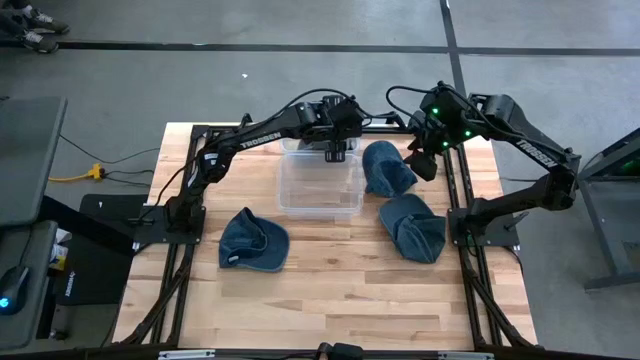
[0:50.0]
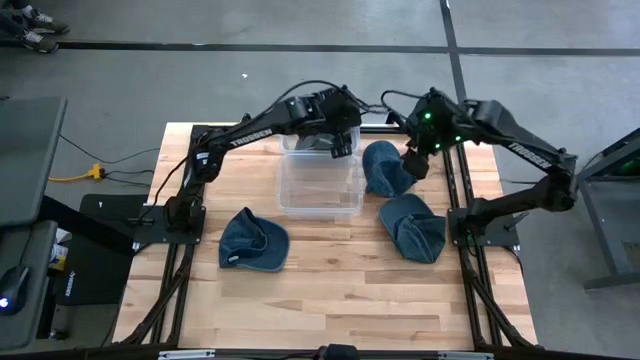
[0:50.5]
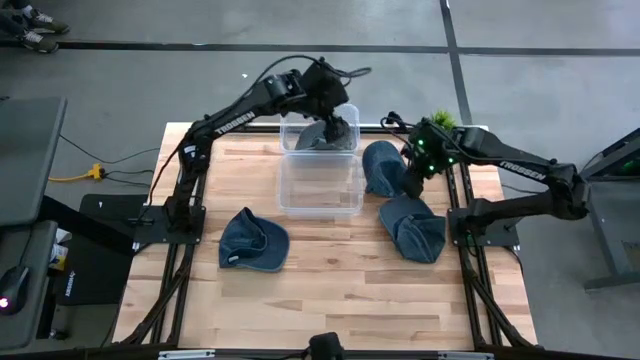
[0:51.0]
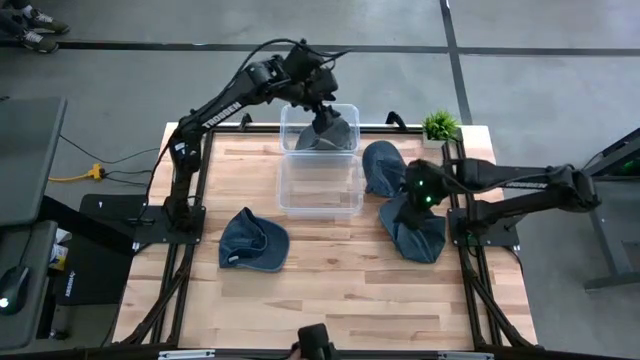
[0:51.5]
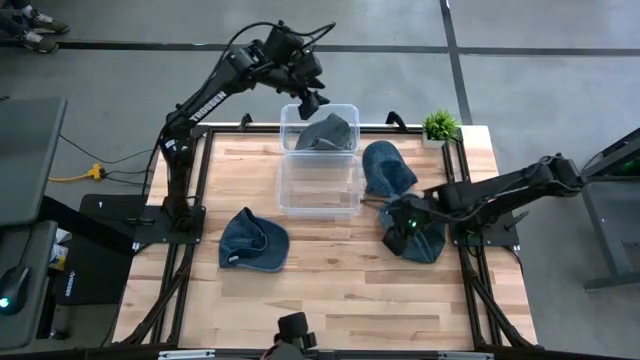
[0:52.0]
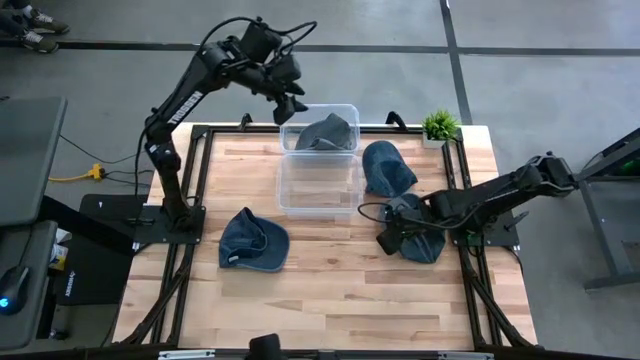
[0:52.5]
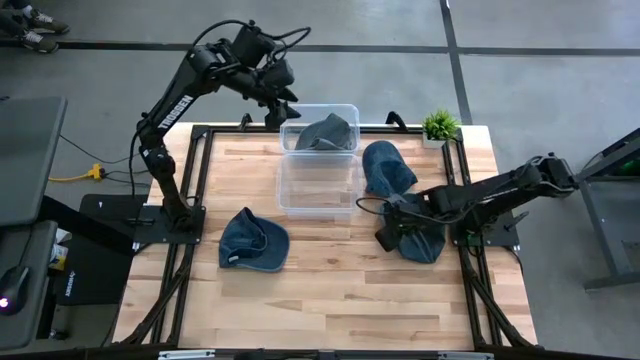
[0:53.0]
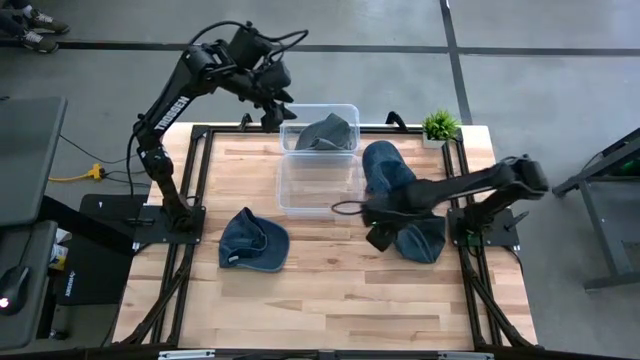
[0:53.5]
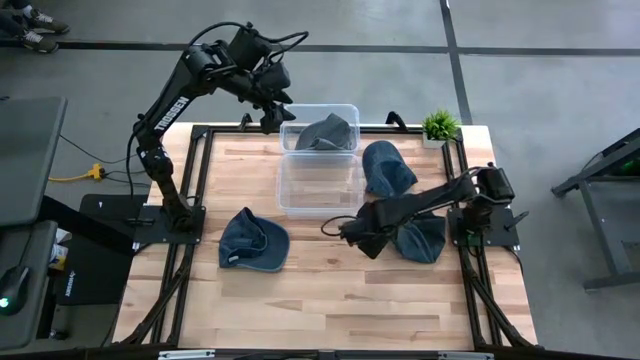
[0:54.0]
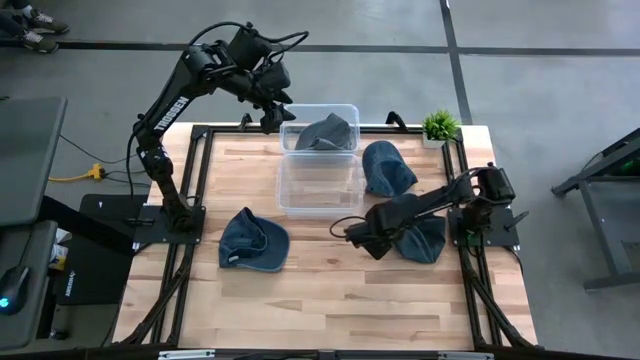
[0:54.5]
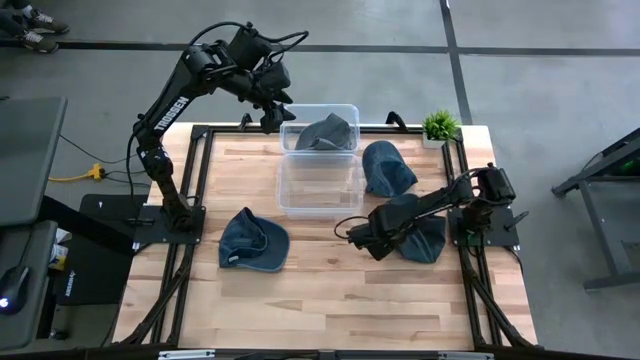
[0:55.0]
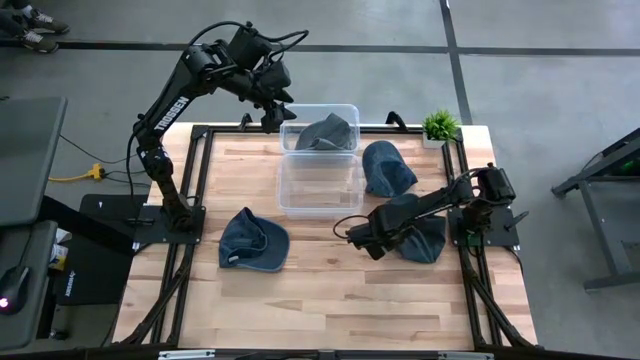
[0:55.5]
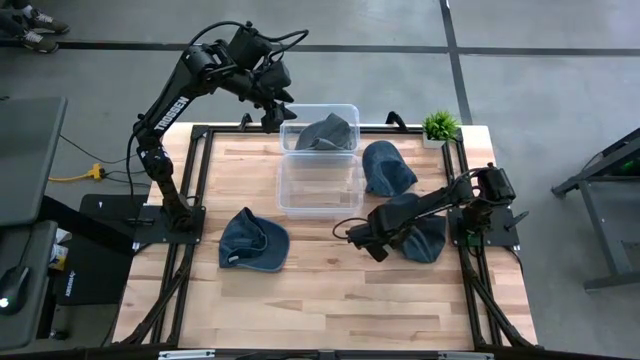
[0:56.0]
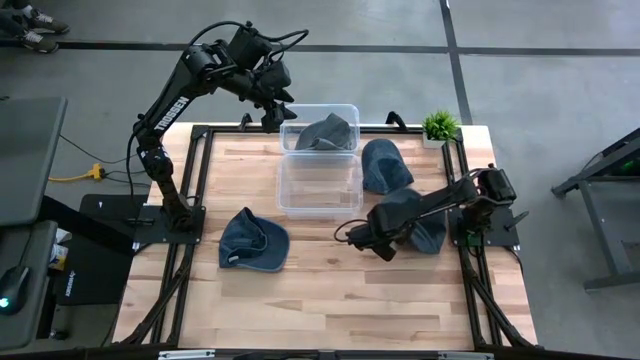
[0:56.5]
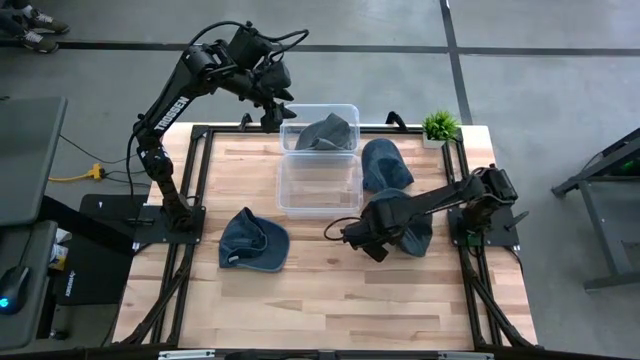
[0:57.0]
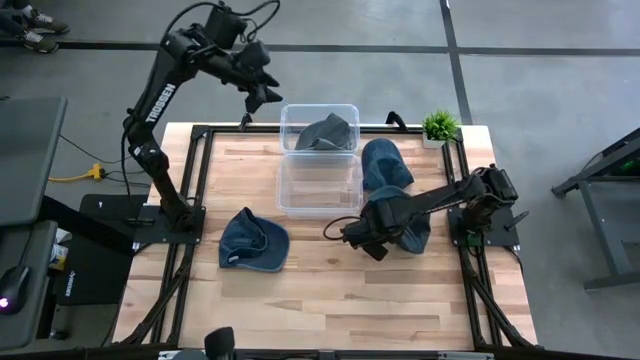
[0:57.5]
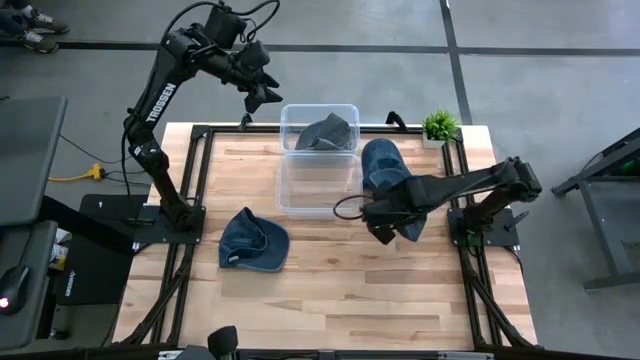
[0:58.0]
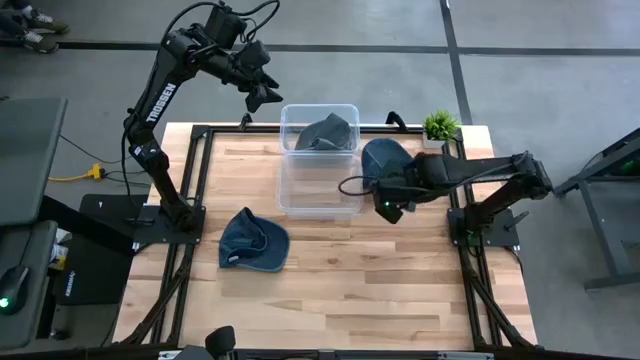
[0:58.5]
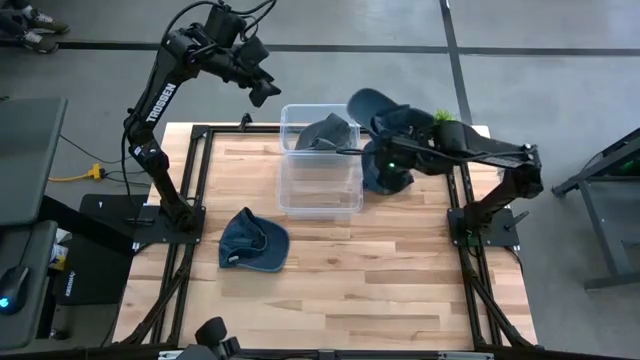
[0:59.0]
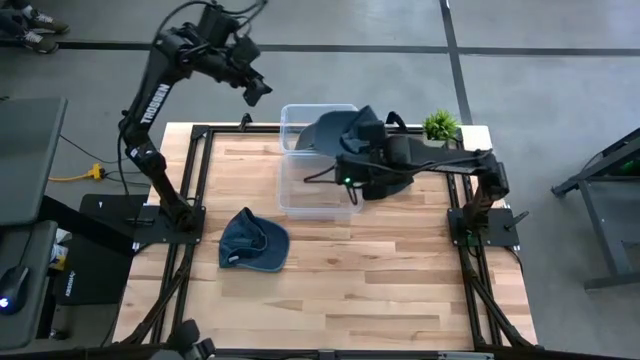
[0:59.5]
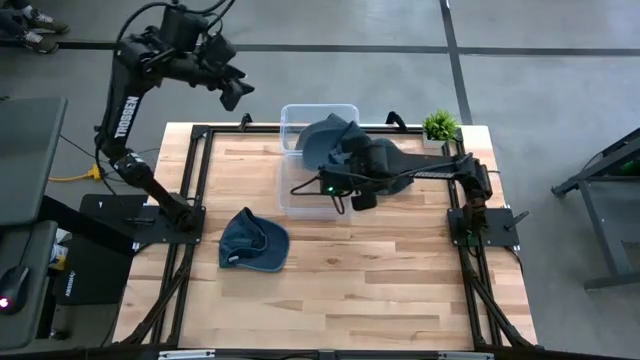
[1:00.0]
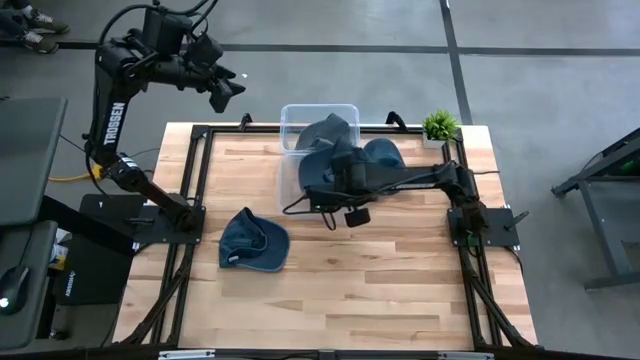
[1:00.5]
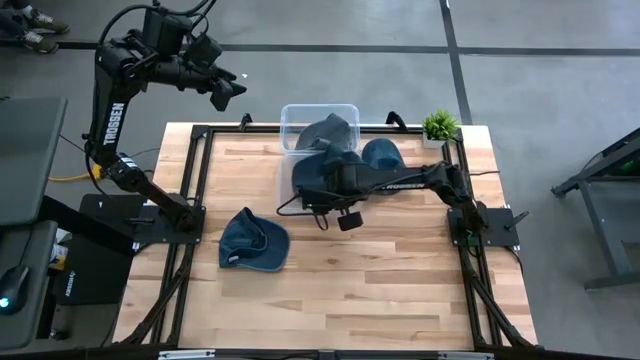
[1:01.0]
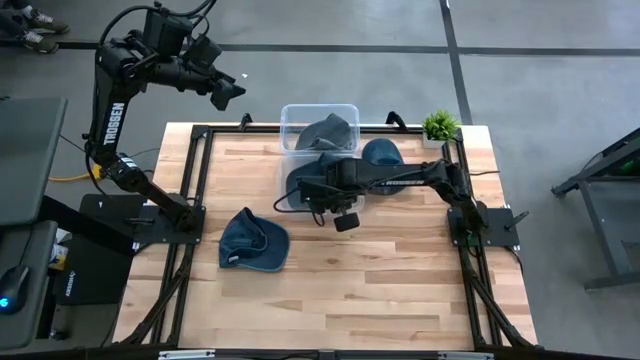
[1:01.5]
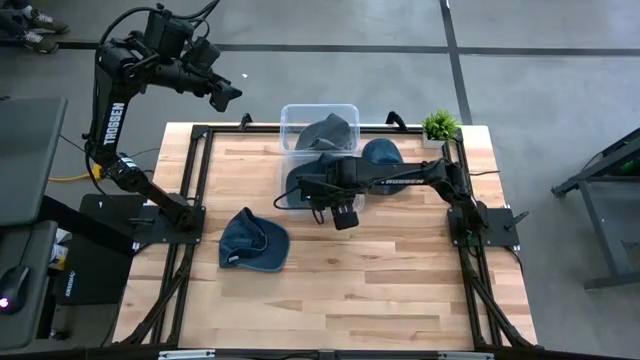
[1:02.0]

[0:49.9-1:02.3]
Task: Pick & Place hat
Put the bottom right dark blue cap into the bottom transparent bin

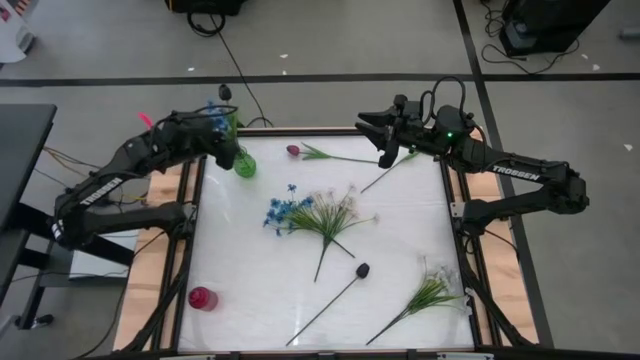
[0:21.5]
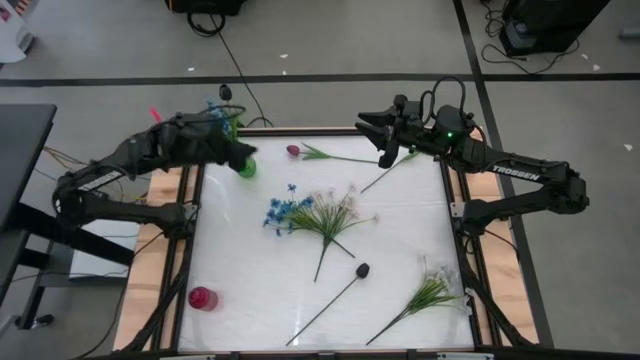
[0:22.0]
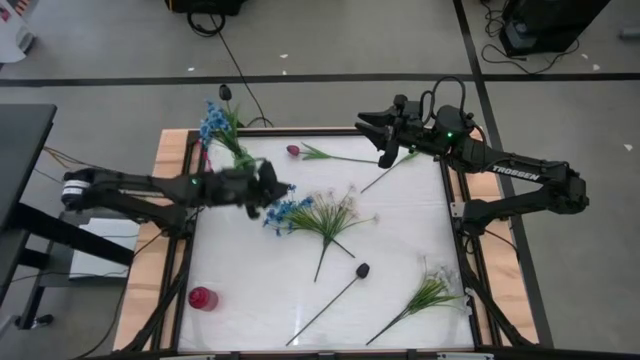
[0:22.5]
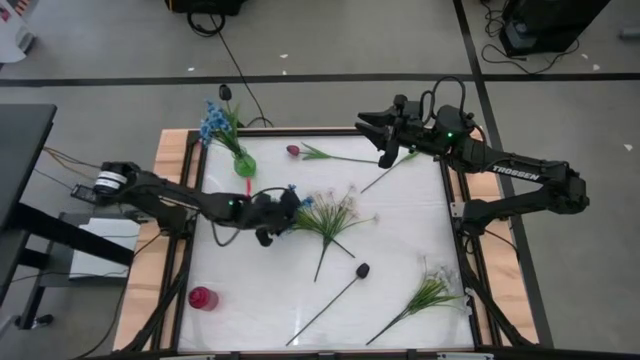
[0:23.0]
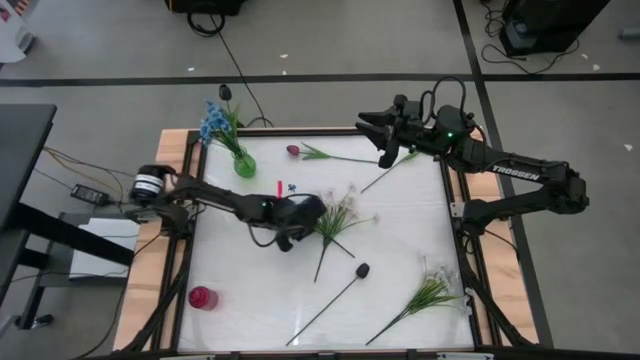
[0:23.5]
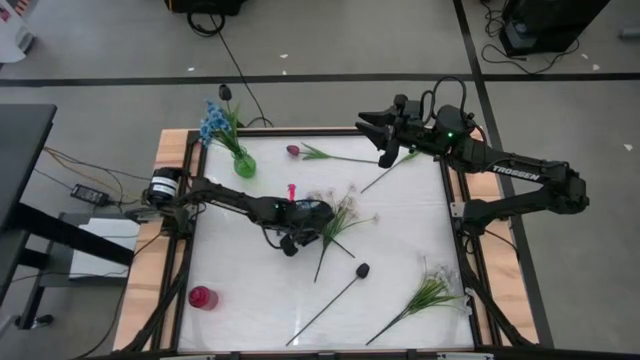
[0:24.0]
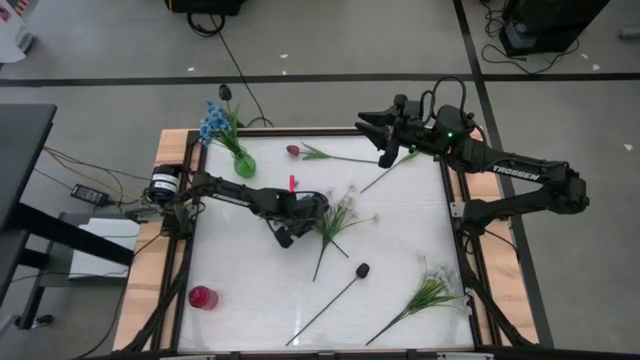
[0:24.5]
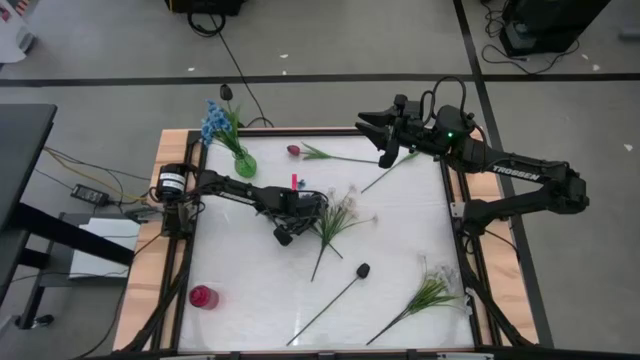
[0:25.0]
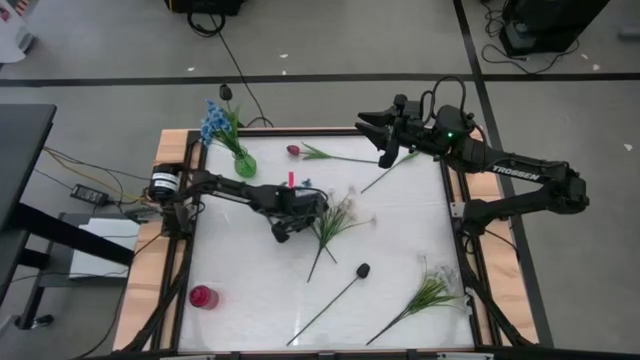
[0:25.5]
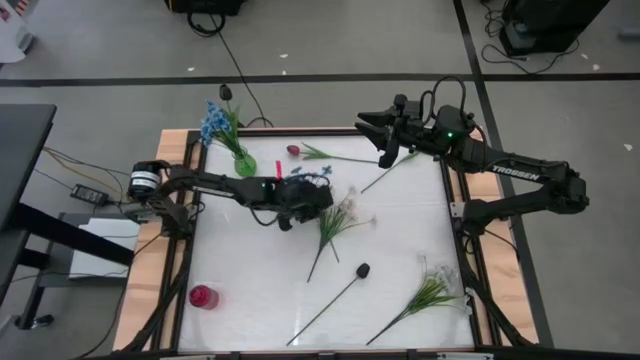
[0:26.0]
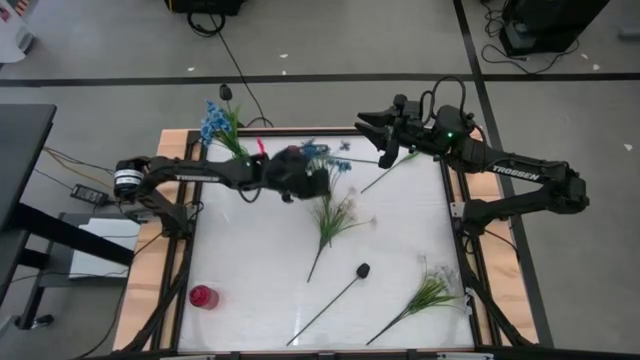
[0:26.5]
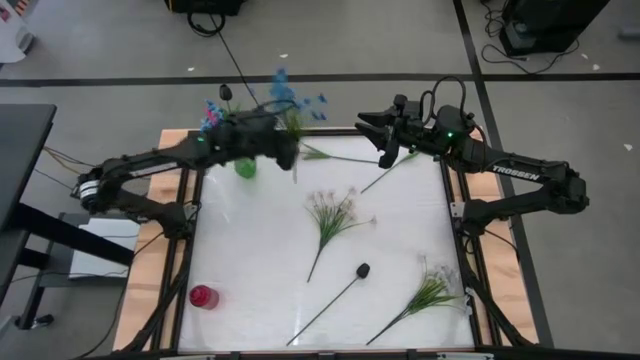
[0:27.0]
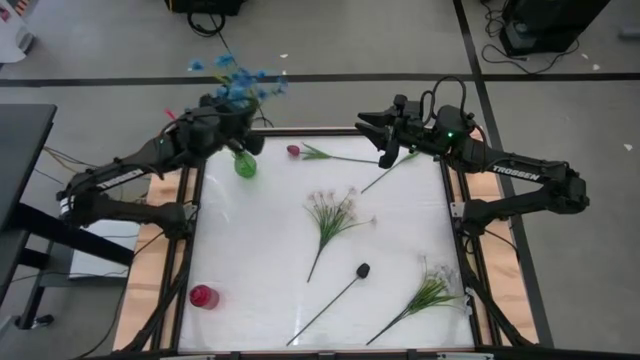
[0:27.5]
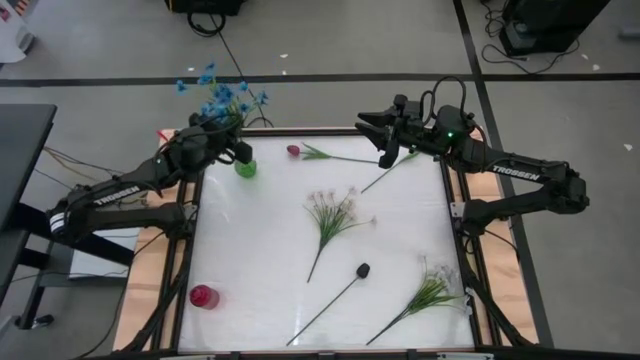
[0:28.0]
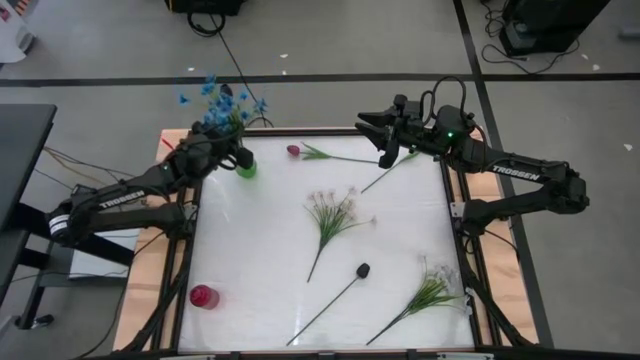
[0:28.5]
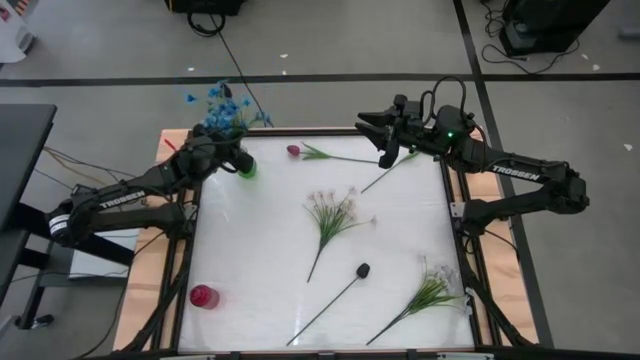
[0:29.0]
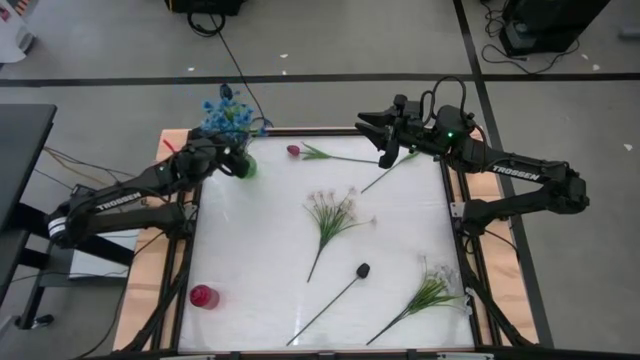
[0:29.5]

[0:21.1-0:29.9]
Task: Sort flowers into vase by color
Put the blue flowers into the green vase
